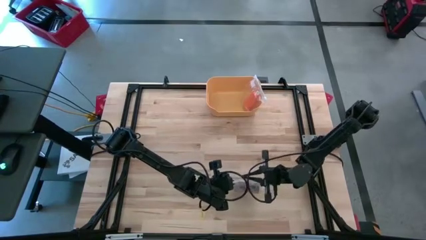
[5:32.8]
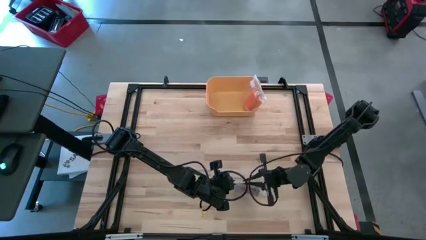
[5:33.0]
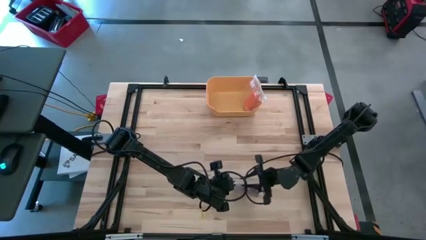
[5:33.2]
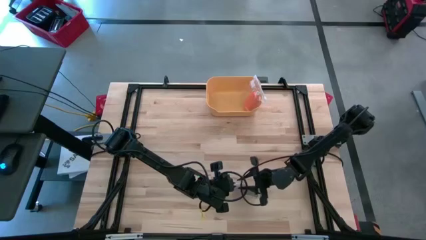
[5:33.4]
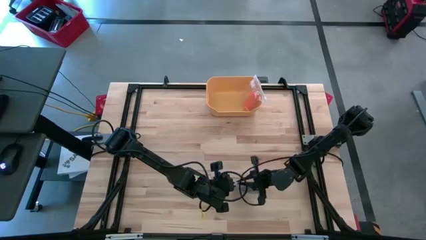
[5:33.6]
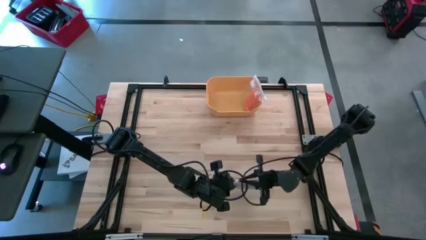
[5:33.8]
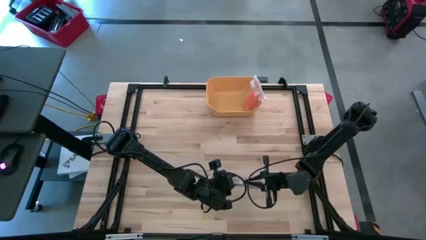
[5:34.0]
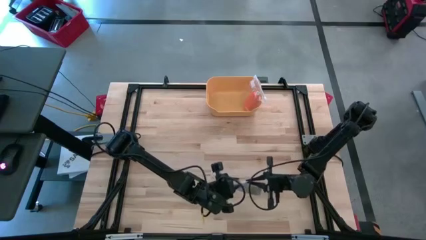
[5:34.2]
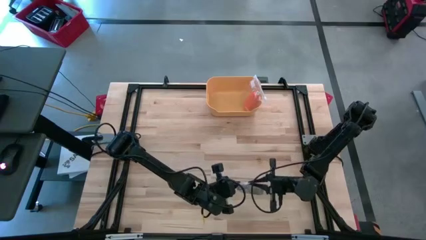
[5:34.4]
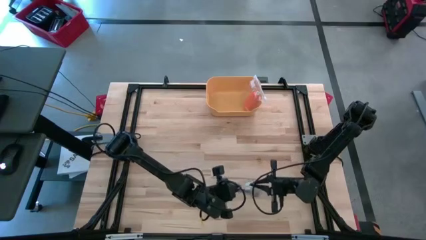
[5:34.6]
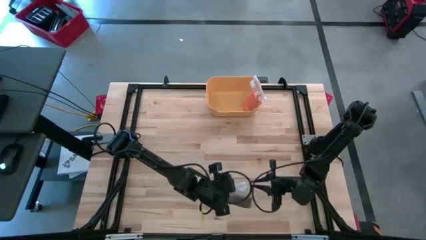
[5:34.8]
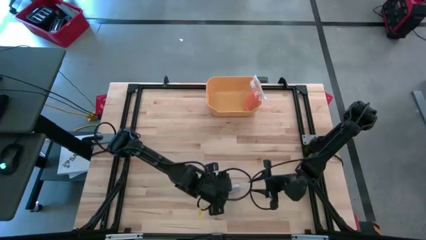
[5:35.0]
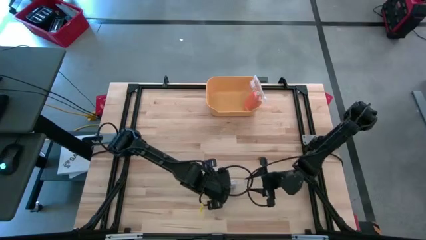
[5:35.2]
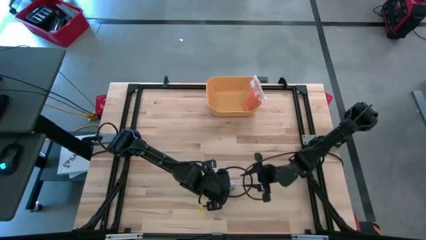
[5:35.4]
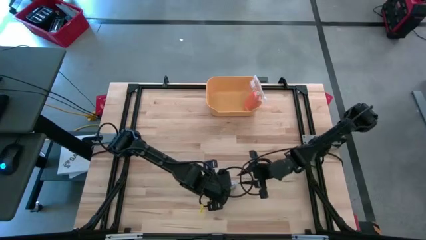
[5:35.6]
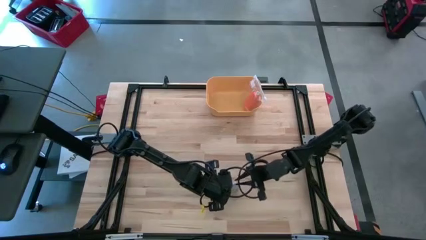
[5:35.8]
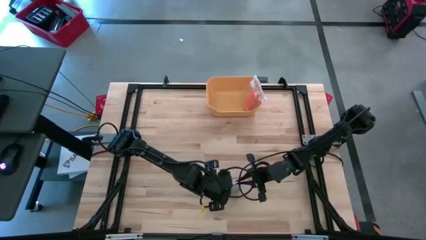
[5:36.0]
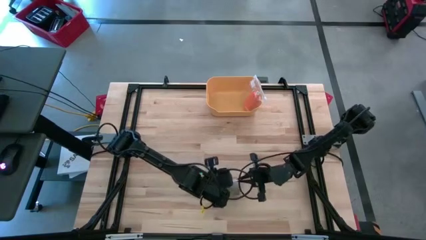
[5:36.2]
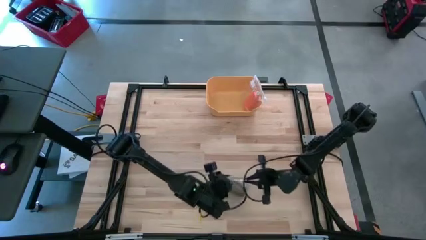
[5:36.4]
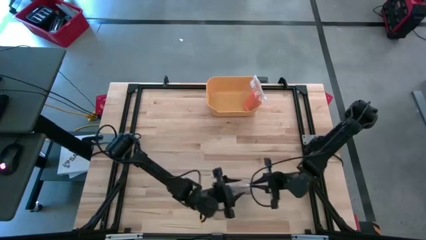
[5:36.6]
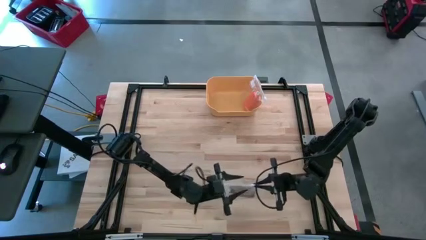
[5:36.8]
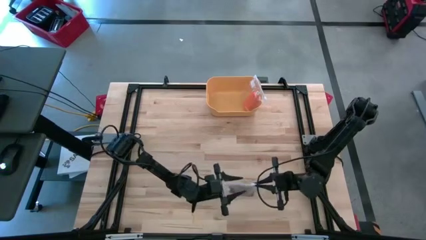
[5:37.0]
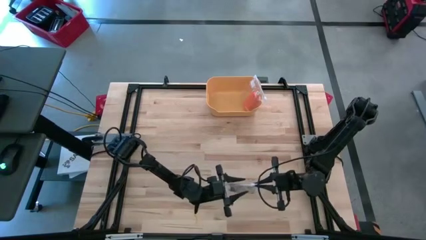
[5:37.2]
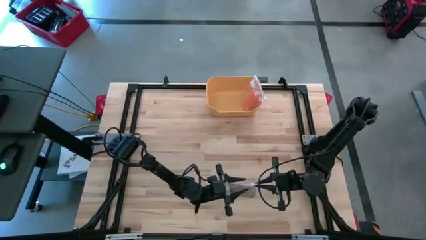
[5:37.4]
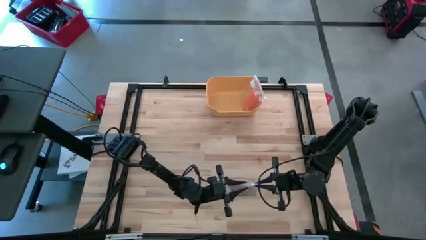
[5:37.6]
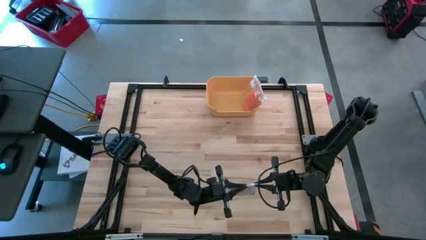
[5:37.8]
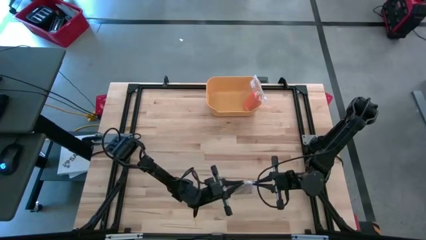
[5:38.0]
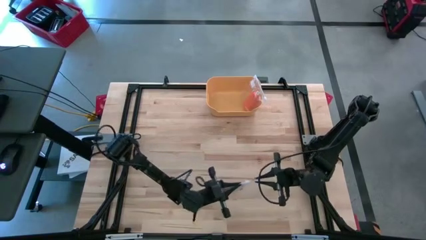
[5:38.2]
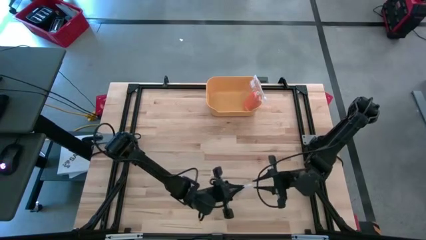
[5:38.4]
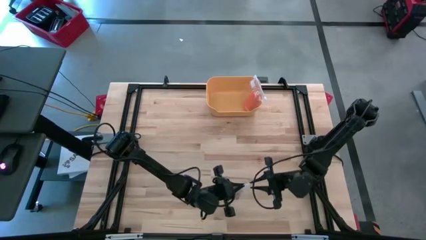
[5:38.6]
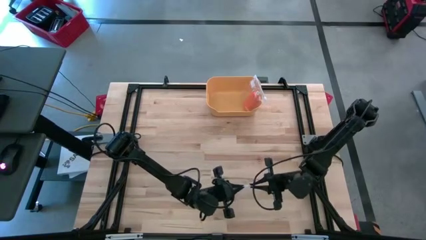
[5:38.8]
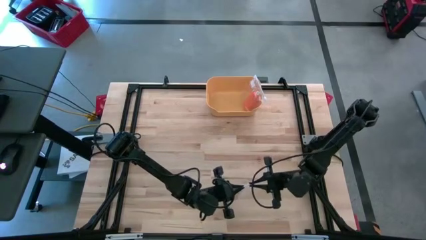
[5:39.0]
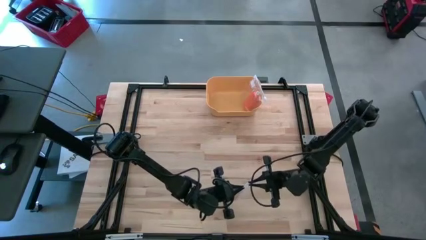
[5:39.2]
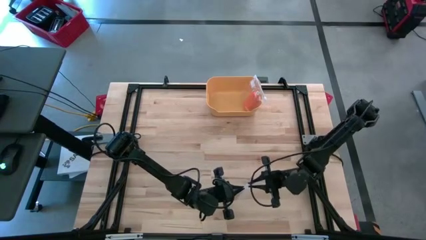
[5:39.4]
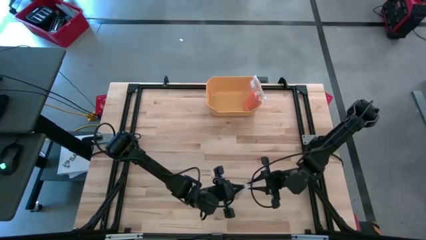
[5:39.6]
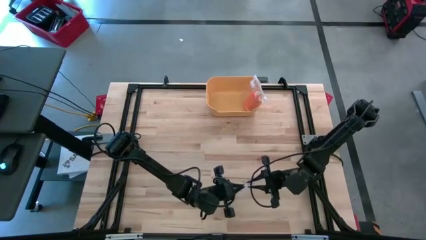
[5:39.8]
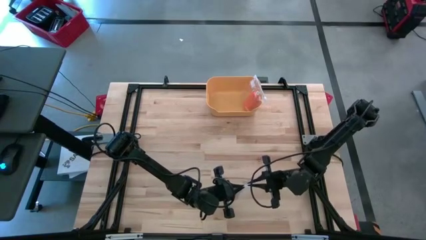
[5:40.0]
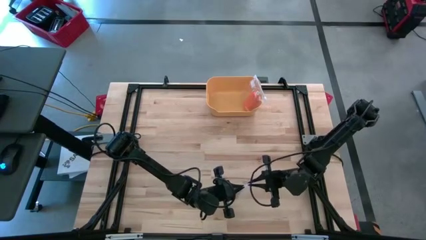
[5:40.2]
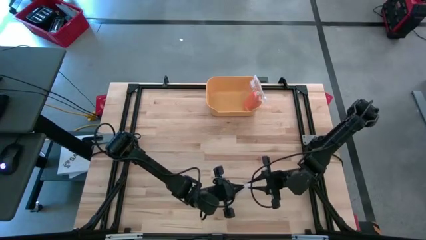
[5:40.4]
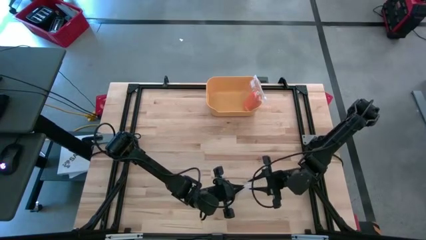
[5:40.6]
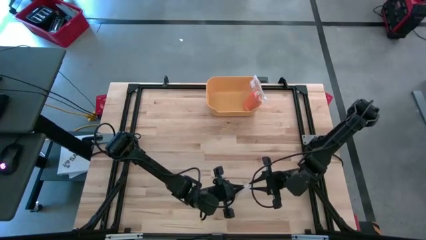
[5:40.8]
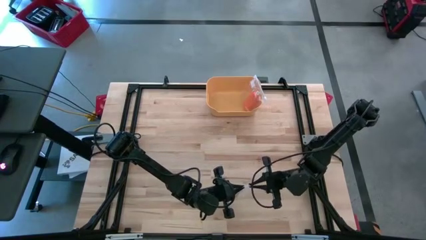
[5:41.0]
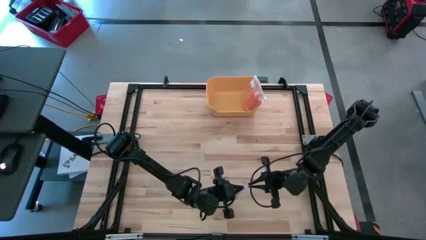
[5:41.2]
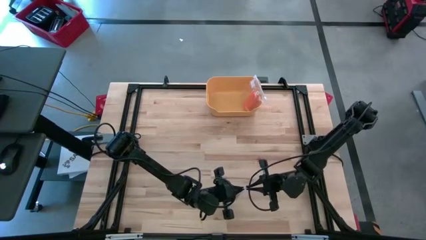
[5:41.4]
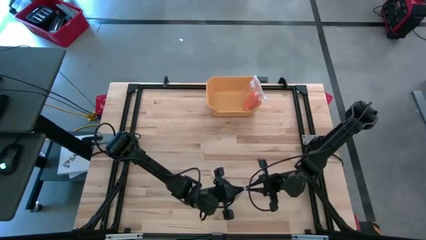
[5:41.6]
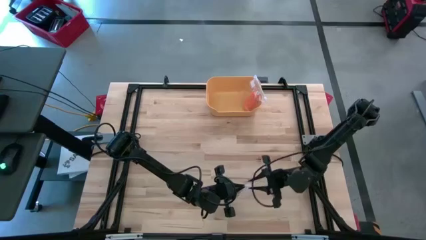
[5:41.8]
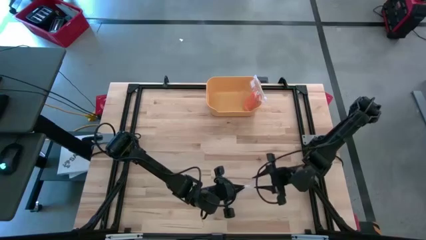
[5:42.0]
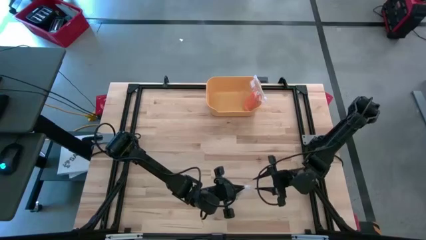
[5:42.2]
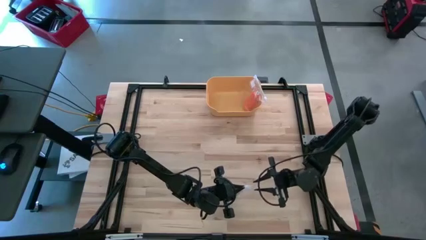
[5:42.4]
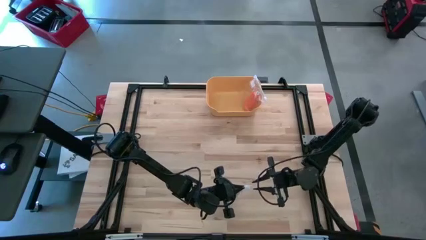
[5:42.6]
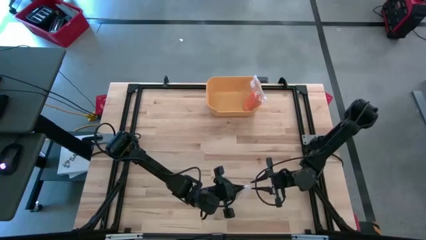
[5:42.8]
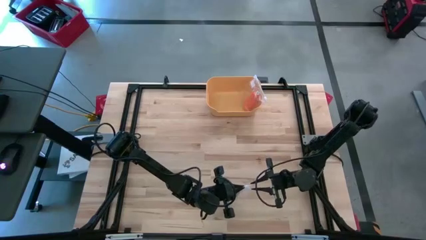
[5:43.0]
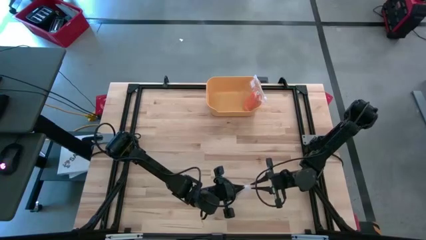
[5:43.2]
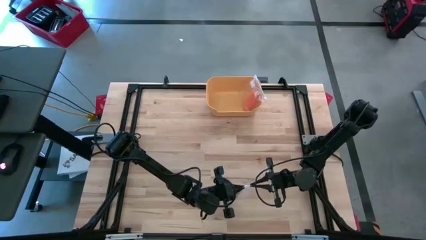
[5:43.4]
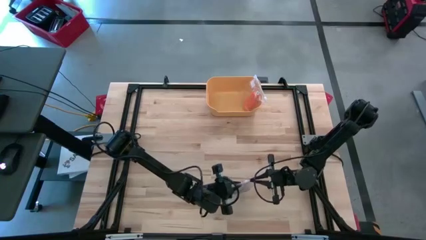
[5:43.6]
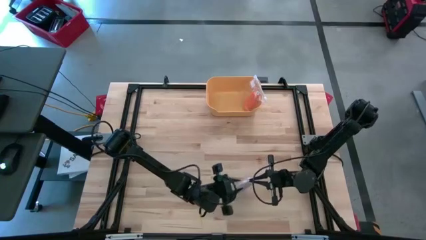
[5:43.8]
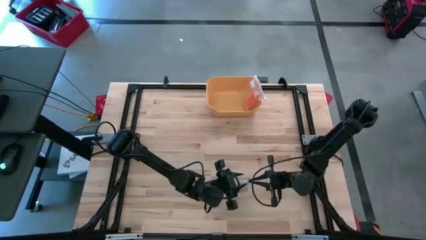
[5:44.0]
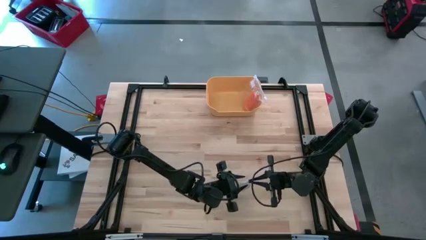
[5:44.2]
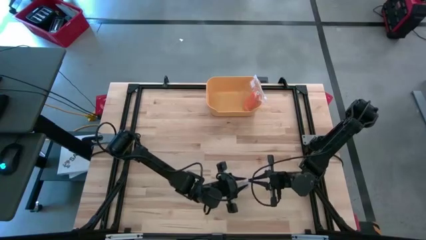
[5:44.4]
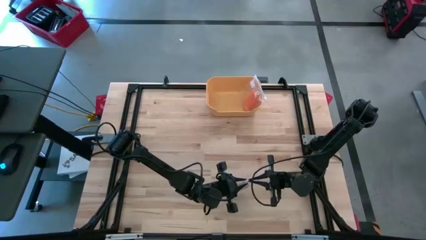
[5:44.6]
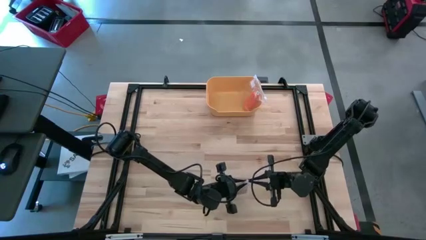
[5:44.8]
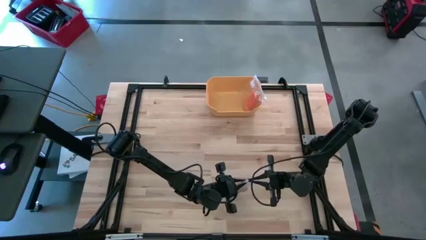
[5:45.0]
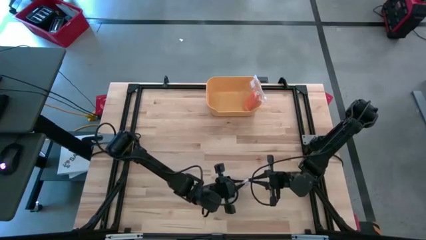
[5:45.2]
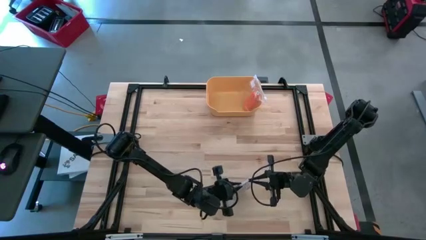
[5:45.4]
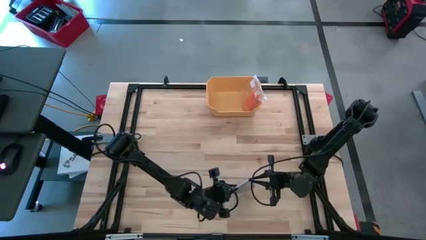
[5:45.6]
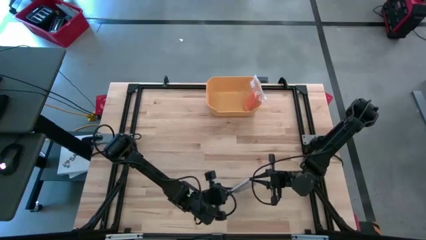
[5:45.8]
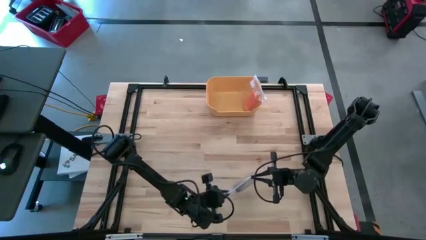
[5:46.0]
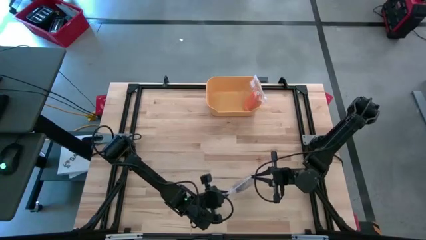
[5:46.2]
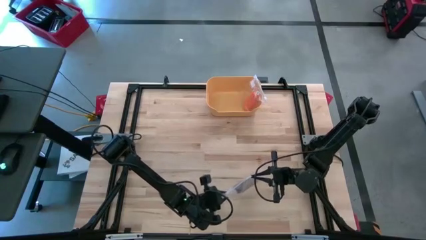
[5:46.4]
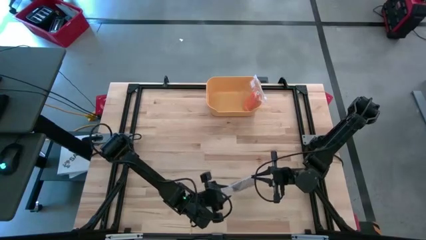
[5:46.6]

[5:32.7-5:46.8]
Task: Roll bandage
Close the transparent zip bag

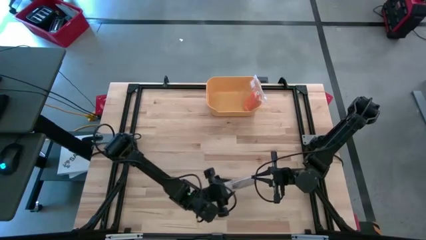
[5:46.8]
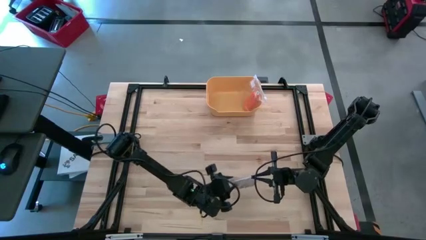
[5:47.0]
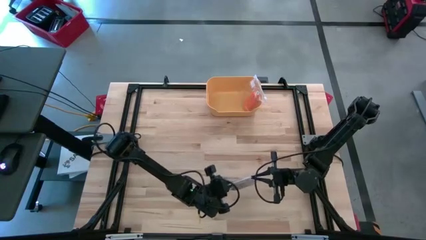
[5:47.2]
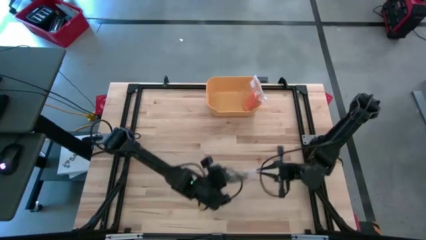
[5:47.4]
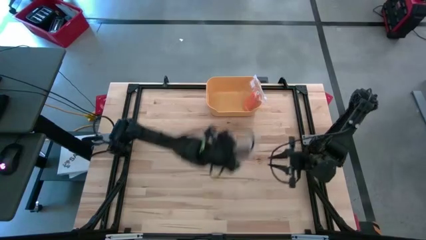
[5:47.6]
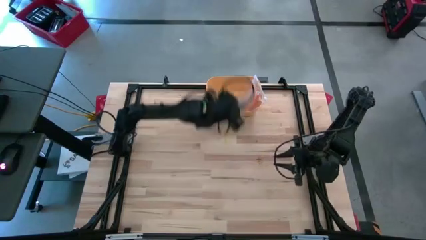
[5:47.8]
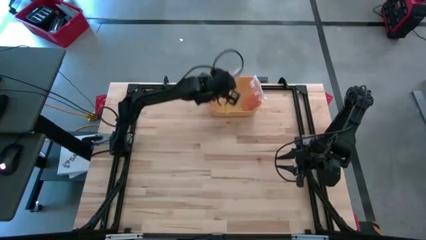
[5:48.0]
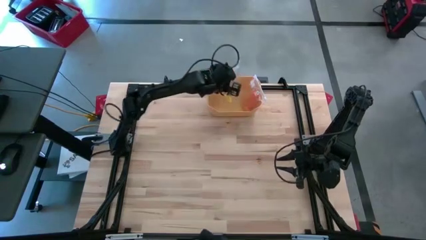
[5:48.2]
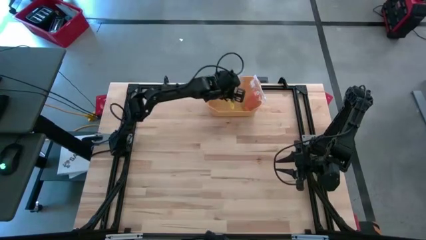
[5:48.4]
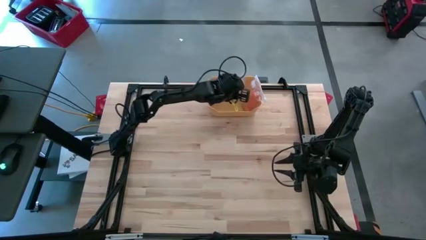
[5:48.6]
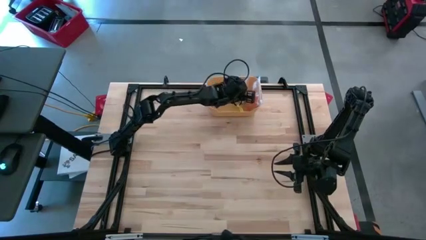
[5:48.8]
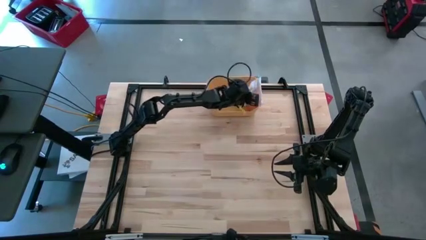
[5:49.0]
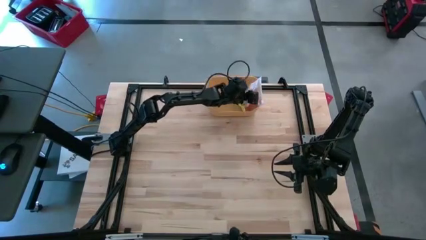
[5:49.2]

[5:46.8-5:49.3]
Put the transparent zip bag into the orange bin
